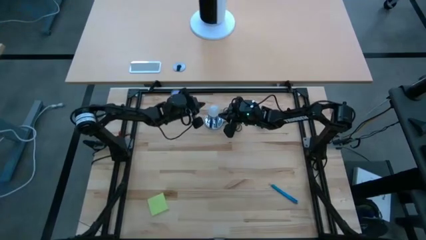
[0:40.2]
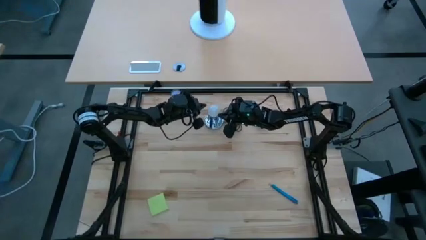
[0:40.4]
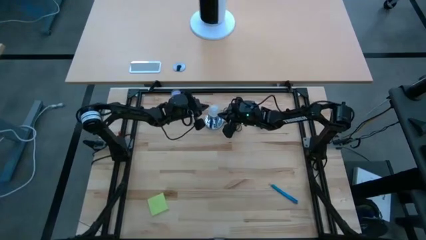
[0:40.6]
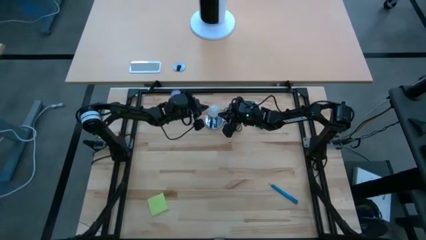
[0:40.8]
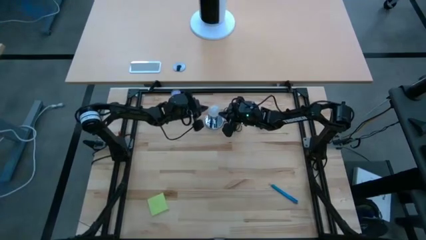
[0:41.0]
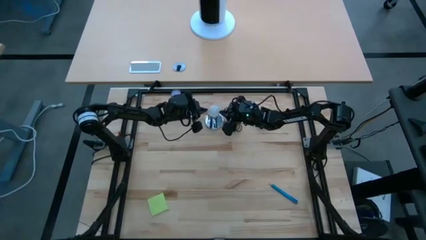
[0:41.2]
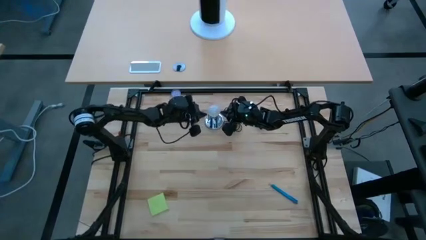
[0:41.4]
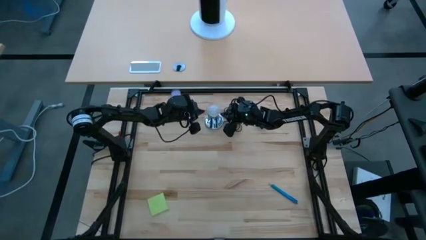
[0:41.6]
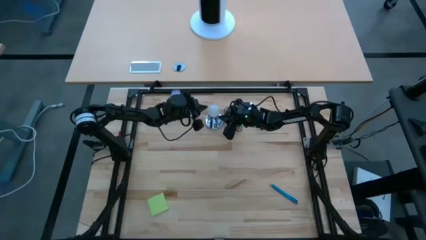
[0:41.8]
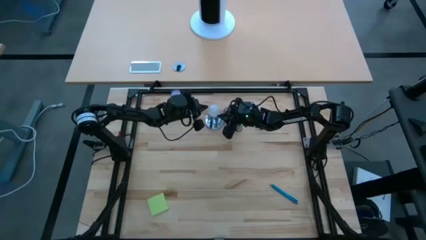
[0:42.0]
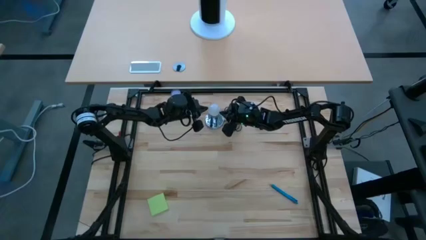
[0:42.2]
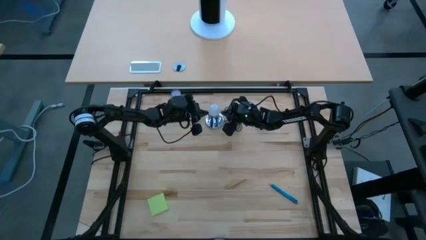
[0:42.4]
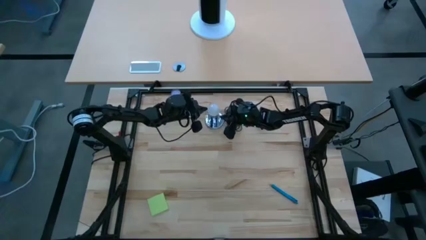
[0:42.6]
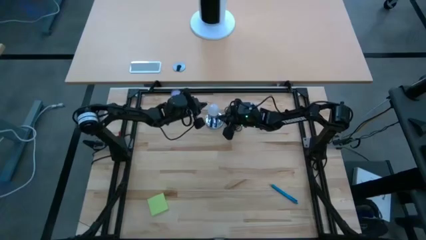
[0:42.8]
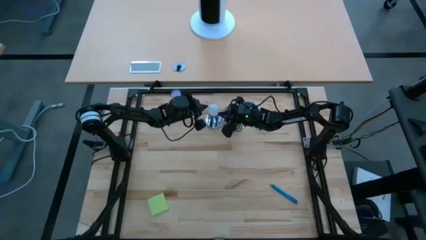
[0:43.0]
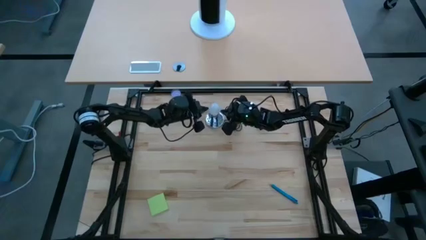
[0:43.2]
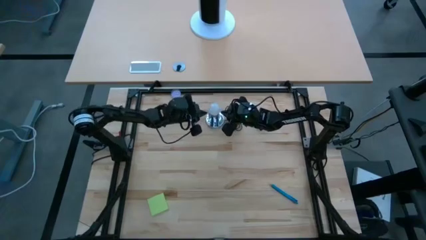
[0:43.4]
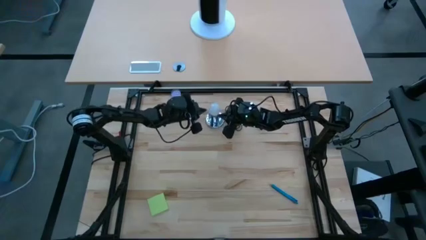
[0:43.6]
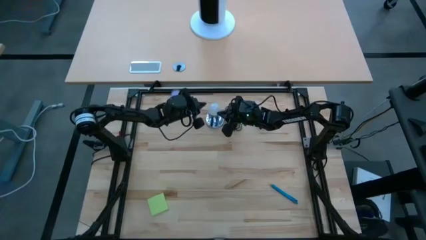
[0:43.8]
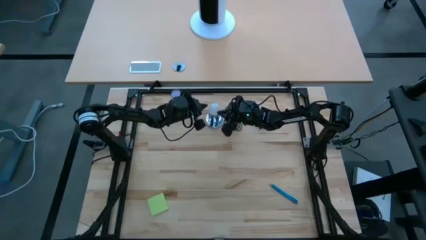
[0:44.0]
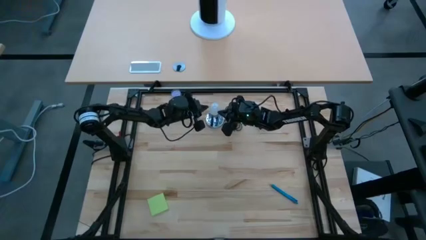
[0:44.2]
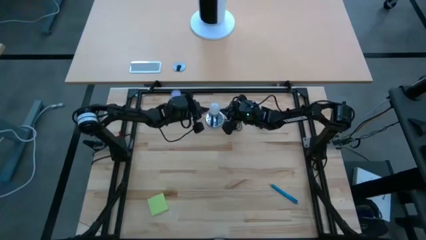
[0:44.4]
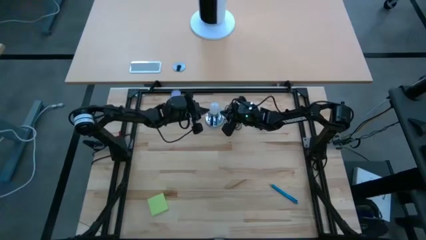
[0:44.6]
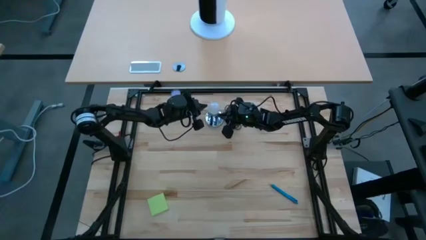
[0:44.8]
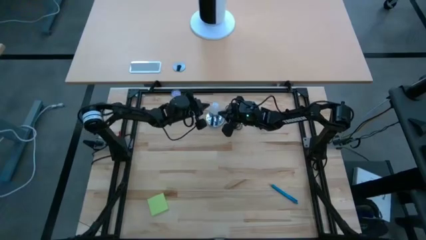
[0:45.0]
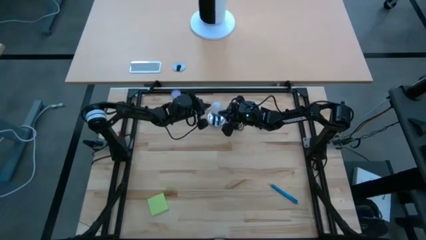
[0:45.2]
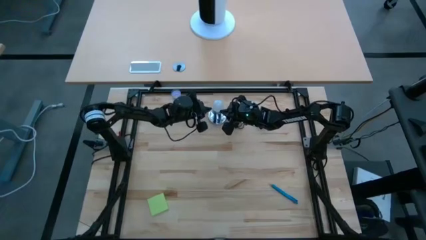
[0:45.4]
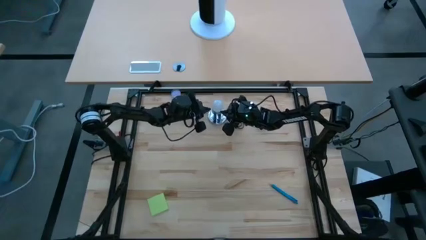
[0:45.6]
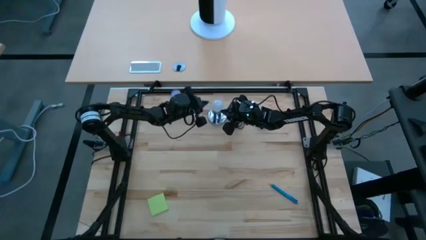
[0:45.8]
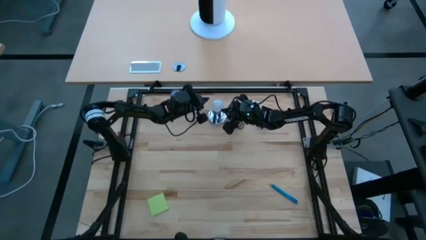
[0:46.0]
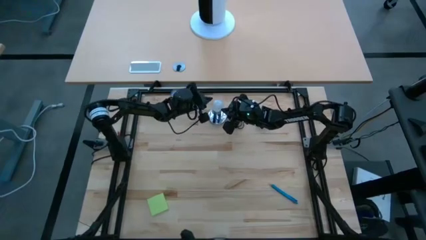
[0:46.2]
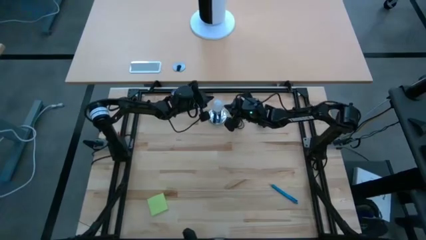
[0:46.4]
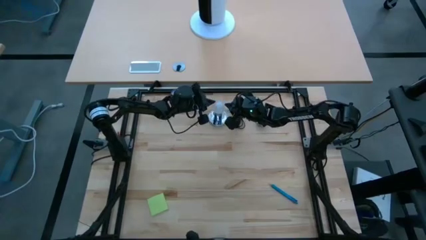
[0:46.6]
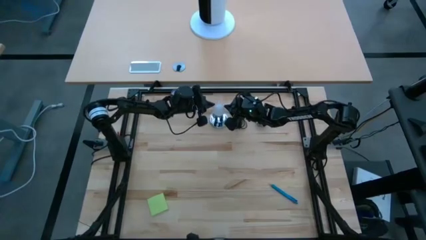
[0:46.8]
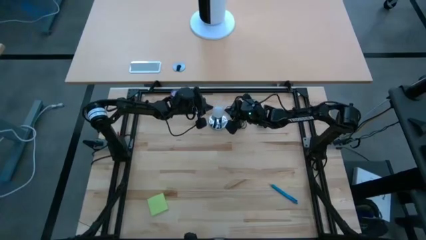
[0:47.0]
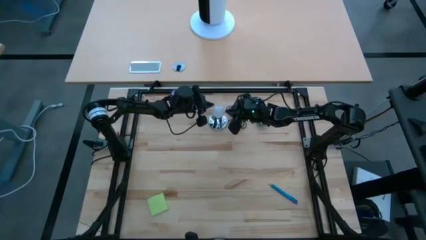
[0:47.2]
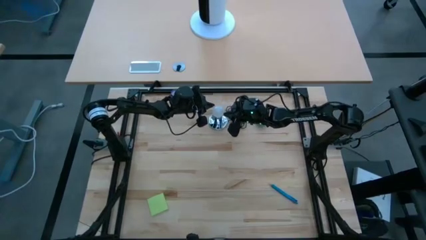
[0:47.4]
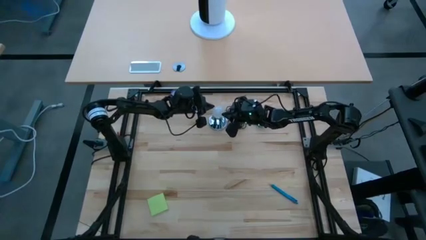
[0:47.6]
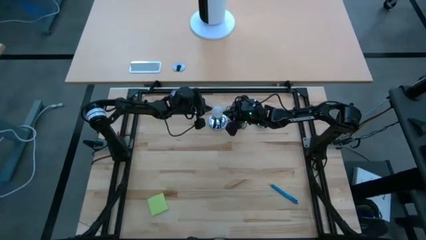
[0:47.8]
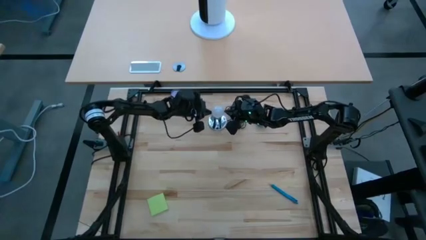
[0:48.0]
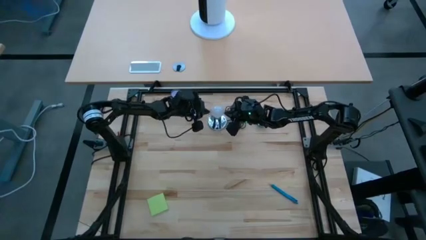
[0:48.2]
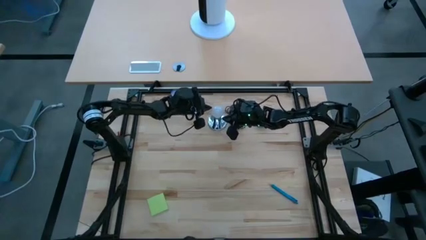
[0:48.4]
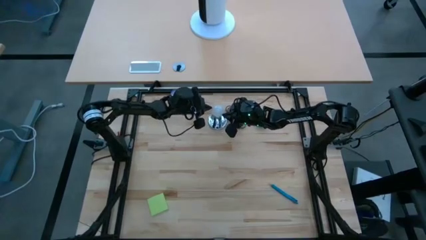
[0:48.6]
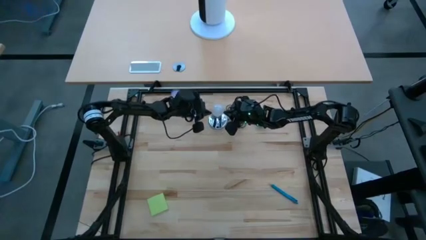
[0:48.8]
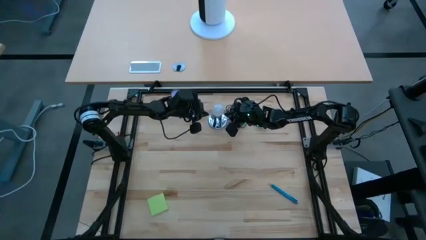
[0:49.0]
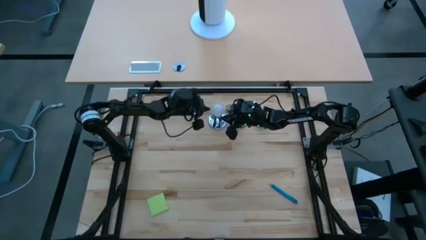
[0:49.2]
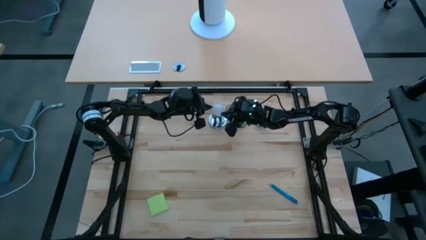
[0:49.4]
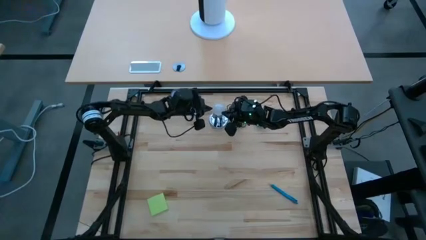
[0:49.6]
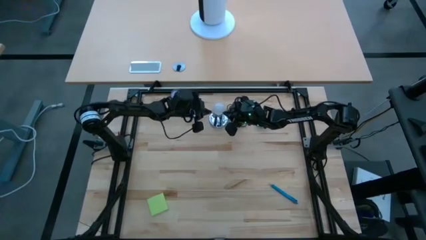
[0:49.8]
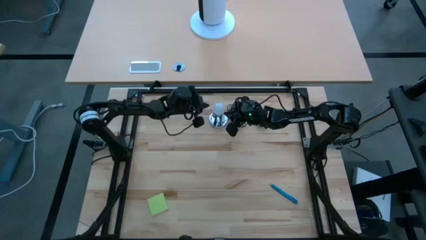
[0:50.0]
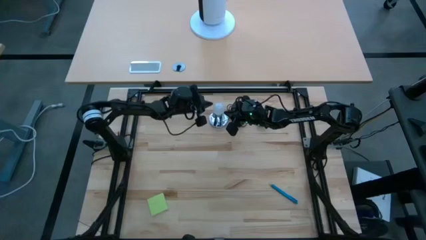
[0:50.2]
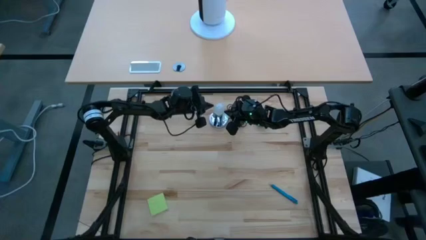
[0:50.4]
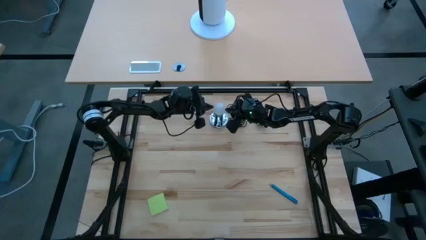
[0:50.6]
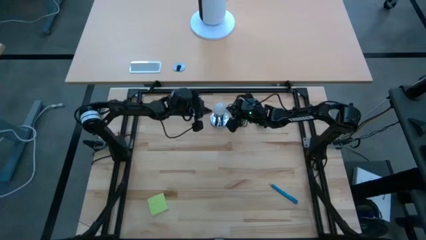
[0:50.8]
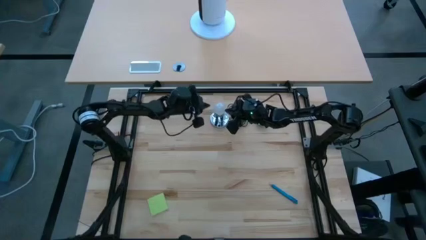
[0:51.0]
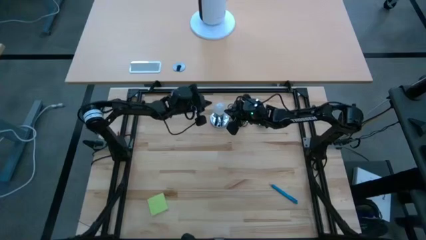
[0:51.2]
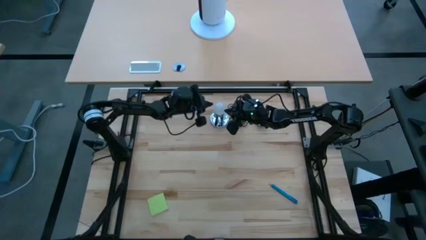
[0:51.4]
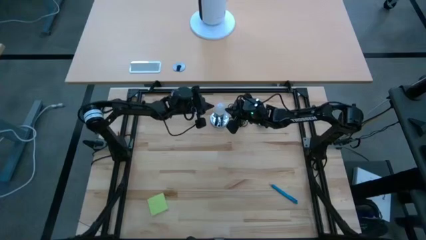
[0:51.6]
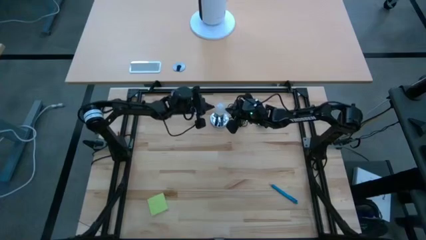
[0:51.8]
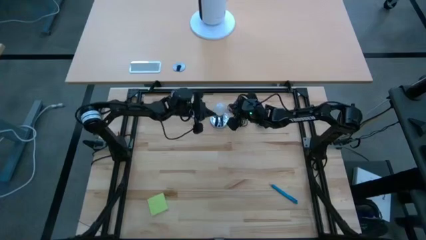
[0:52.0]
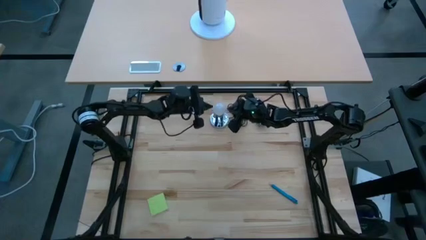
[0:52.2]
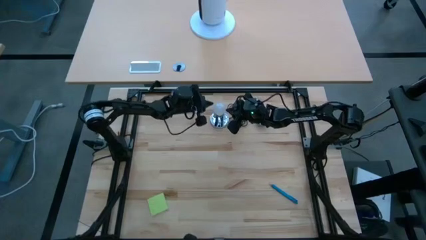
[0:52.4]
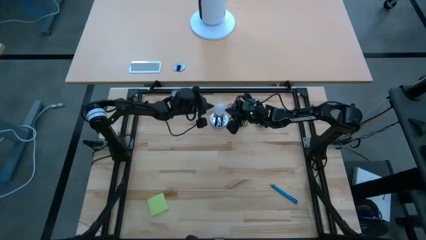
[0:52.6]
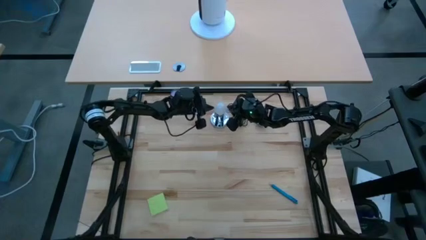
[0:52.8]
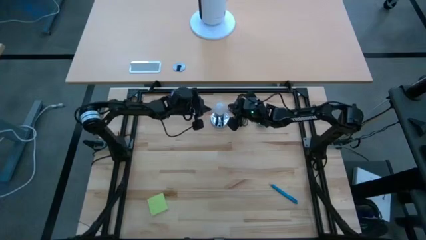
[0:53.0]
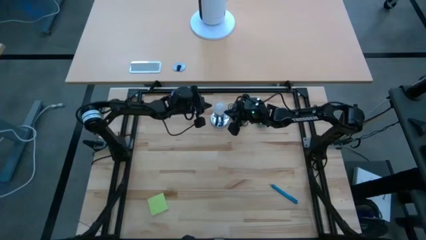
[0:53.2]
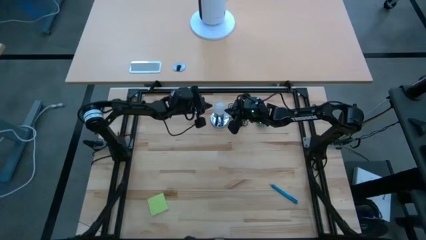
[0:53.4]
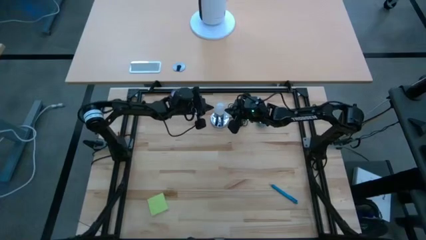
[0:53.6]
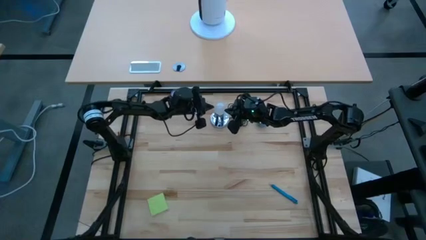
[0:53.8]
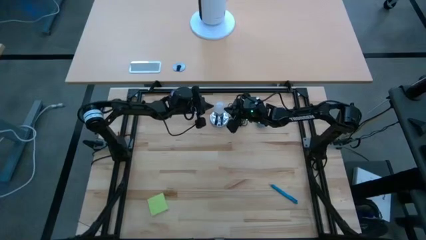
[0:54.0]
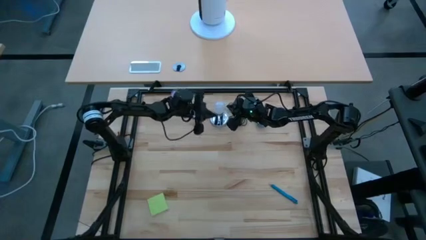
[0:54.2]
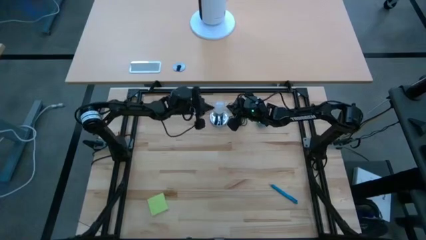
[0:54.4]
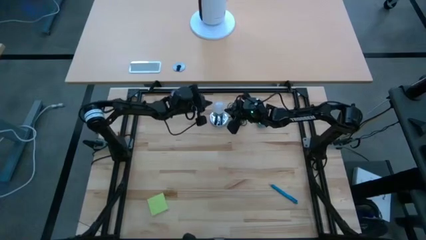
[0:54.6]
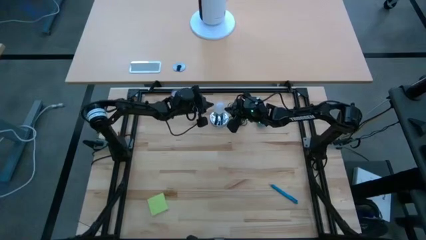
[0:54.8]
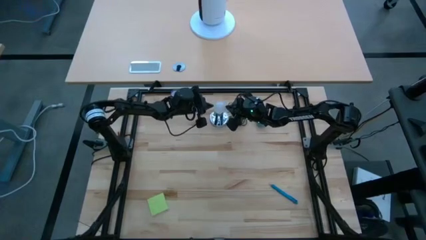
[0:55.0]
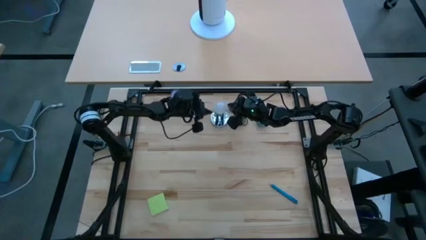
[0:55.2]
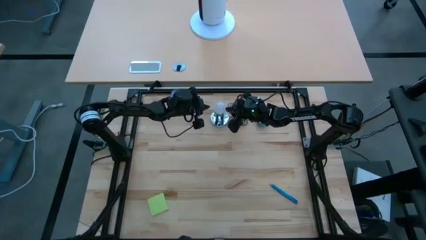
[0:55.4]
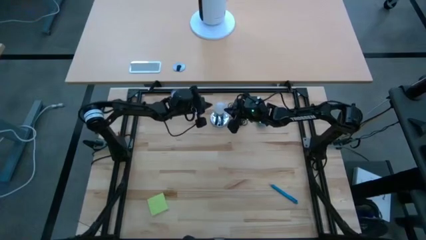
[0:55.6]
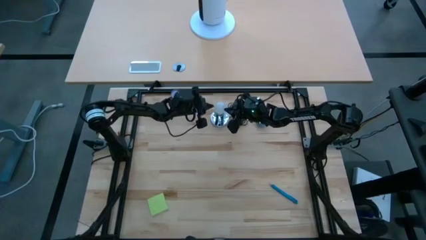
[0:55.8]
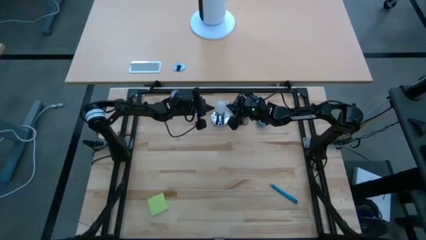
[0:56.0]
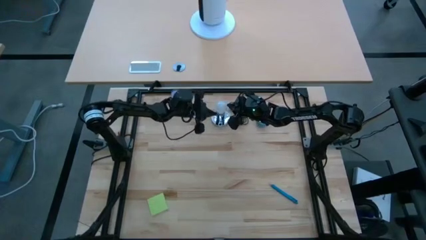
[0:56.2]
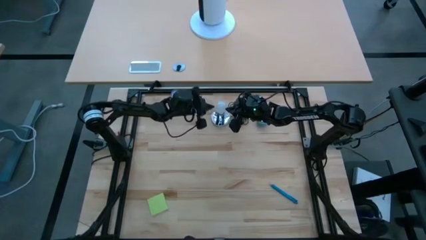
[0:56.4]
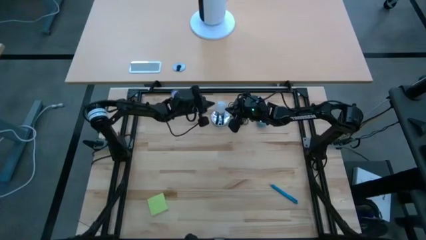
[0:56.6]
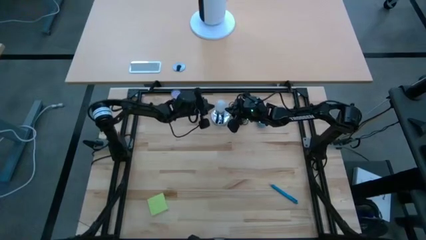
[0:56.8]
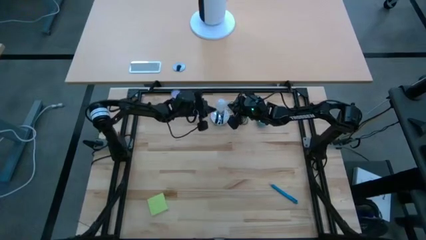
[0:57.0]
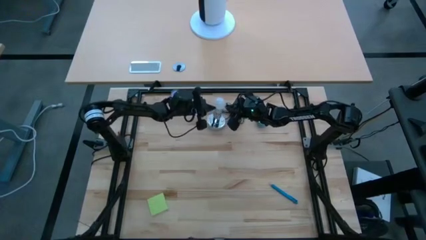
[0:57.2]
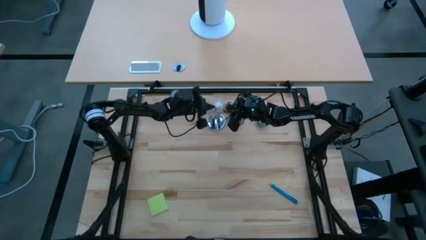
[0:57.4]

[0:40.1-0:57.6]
Task: Screw lightbulb
Remove the bulb from the lamp
